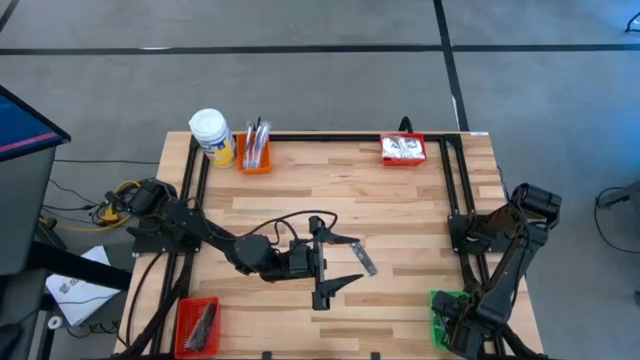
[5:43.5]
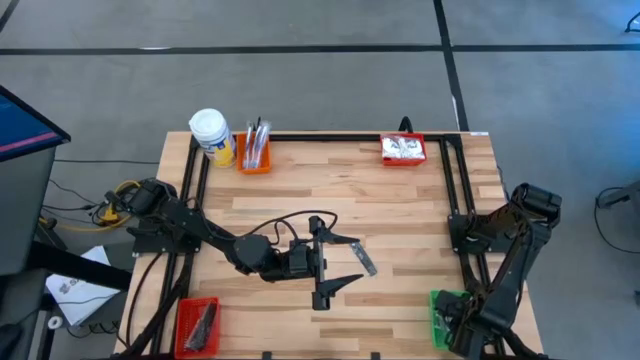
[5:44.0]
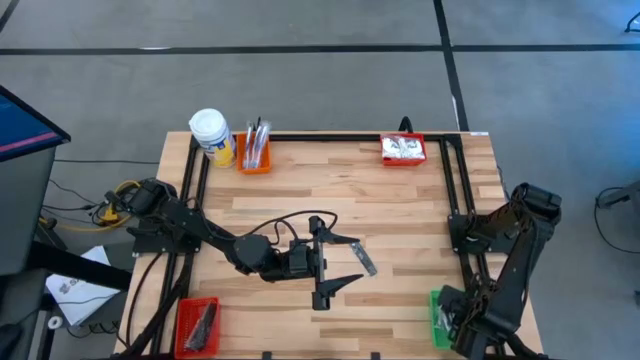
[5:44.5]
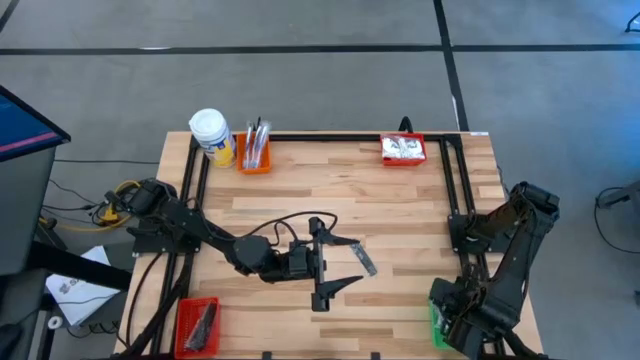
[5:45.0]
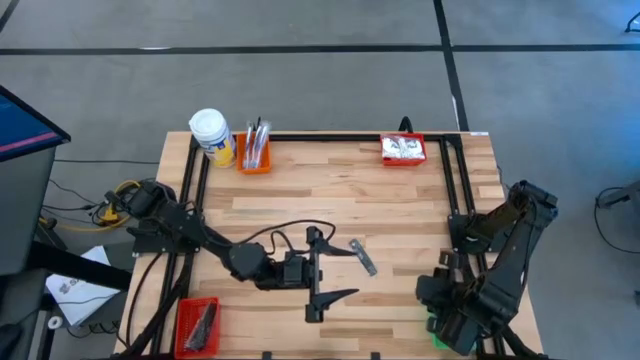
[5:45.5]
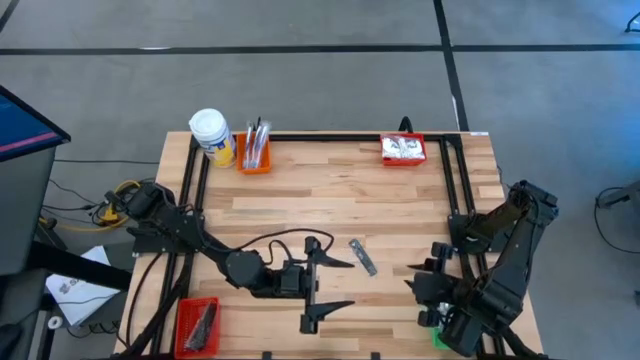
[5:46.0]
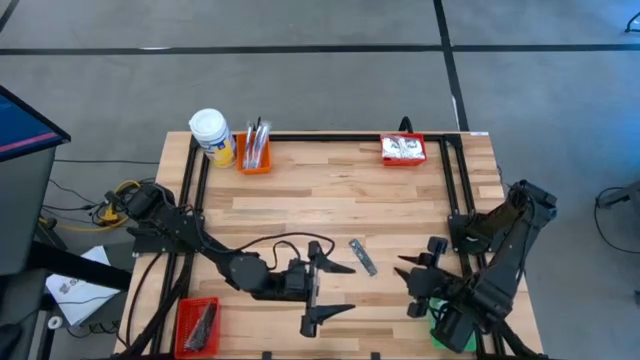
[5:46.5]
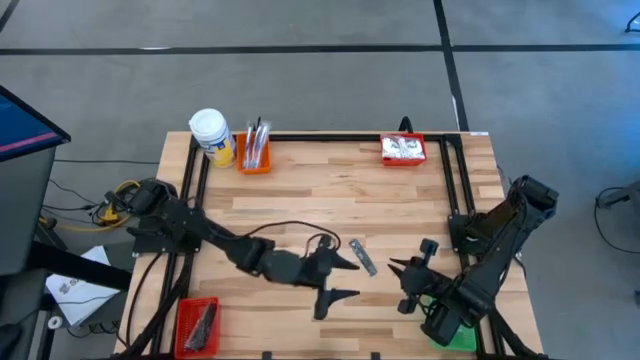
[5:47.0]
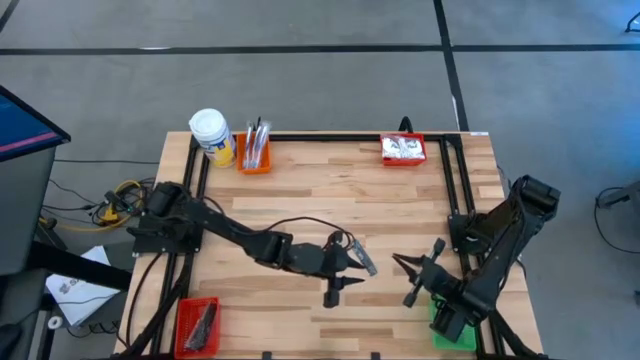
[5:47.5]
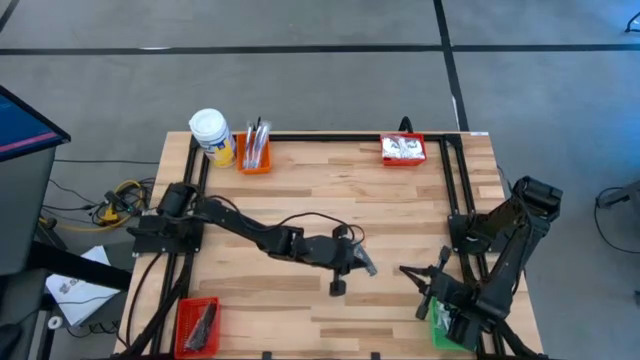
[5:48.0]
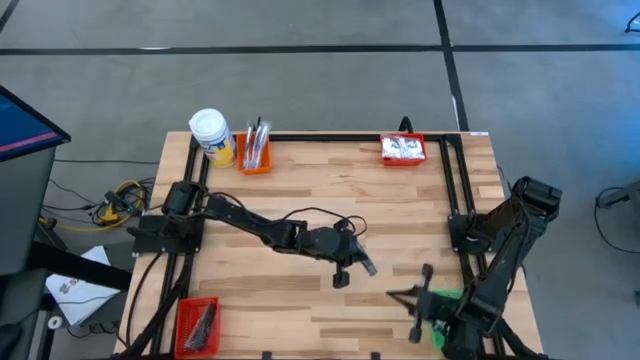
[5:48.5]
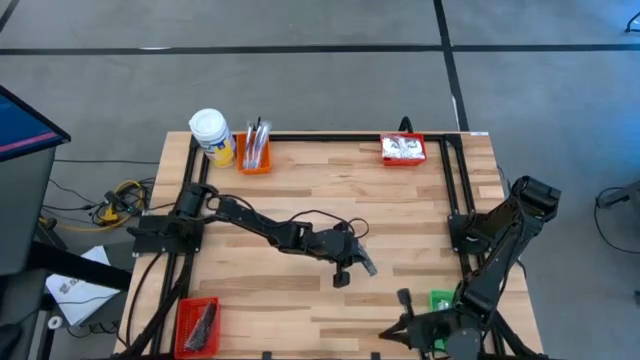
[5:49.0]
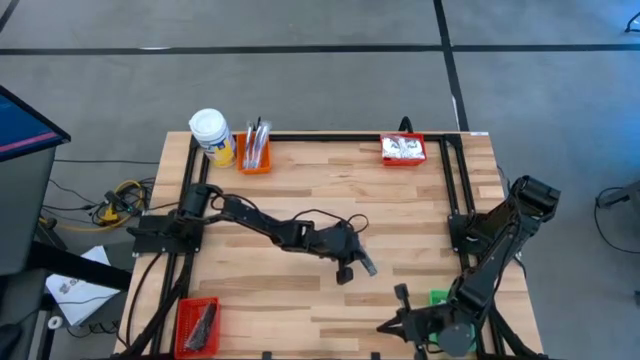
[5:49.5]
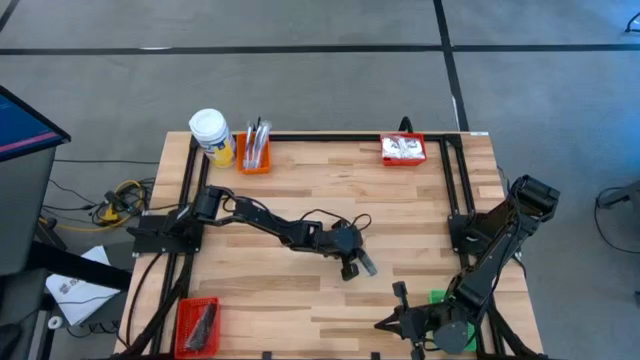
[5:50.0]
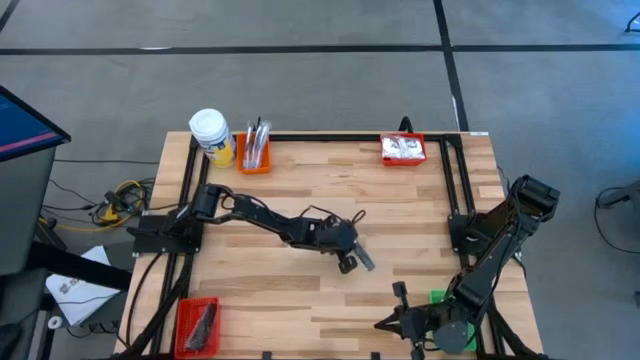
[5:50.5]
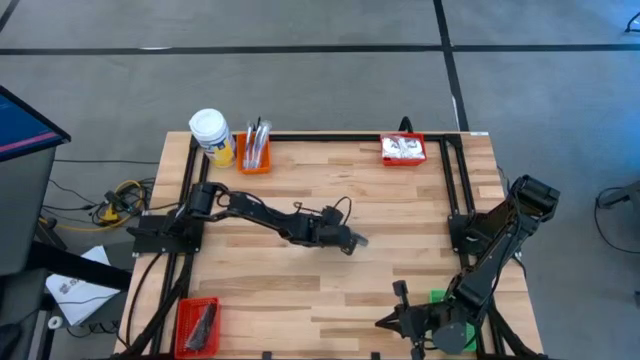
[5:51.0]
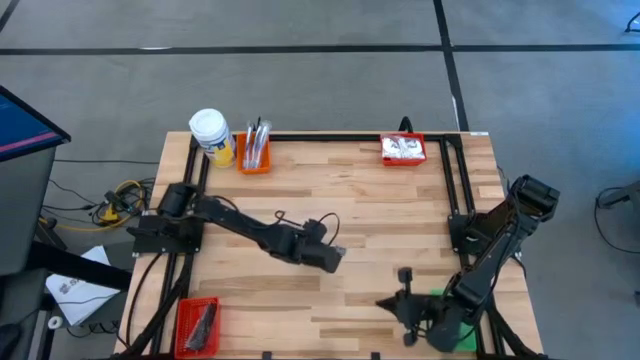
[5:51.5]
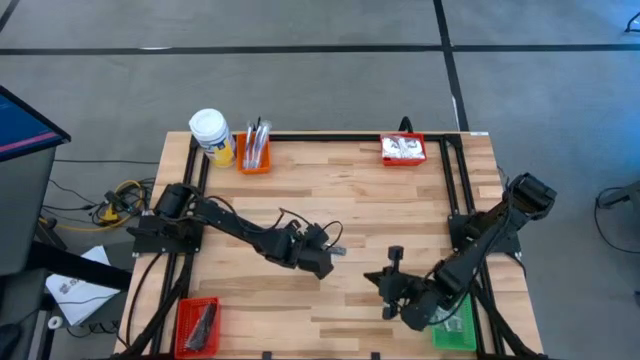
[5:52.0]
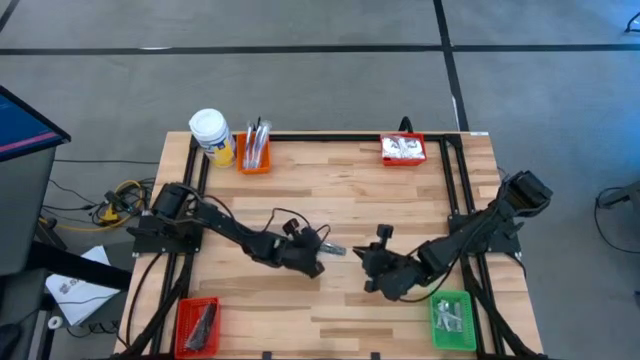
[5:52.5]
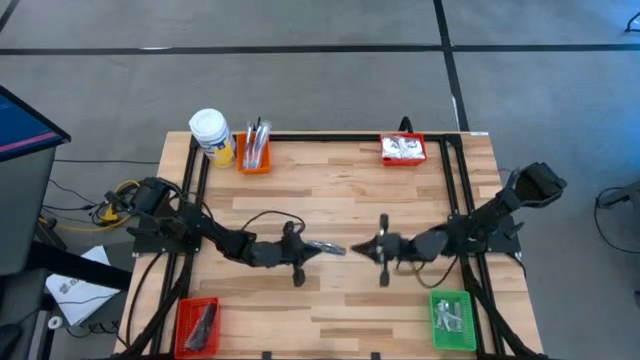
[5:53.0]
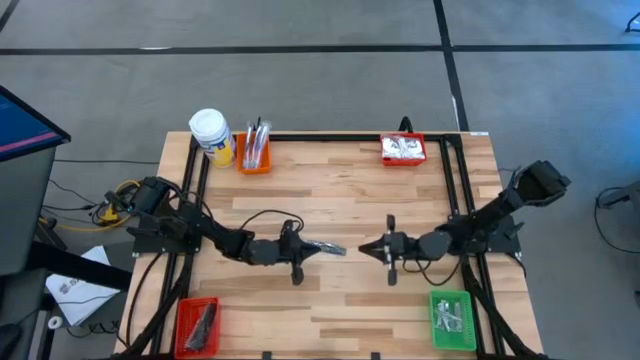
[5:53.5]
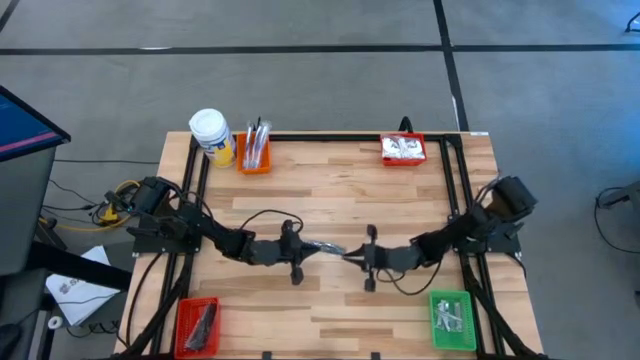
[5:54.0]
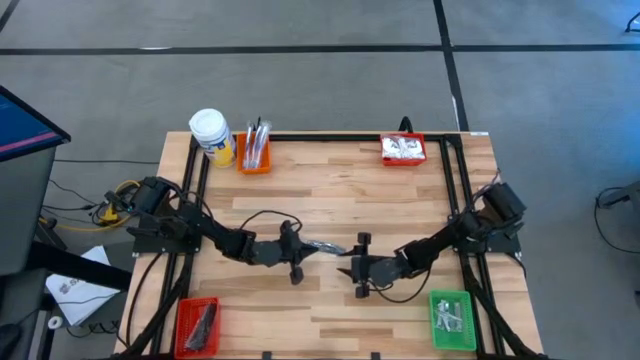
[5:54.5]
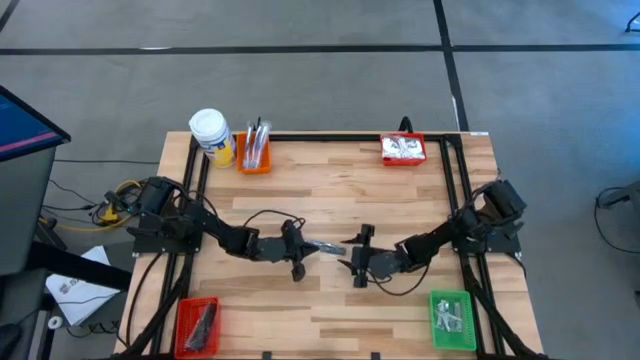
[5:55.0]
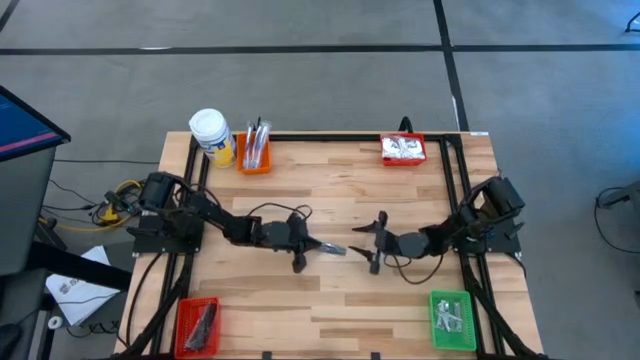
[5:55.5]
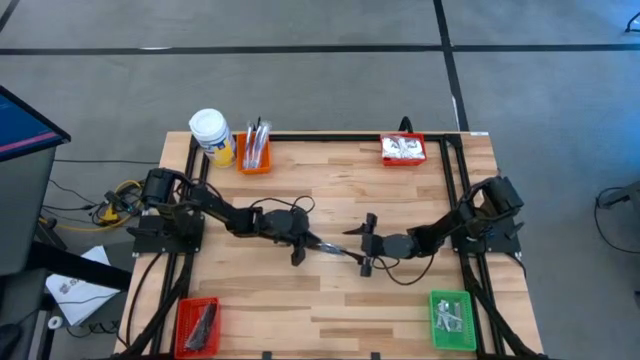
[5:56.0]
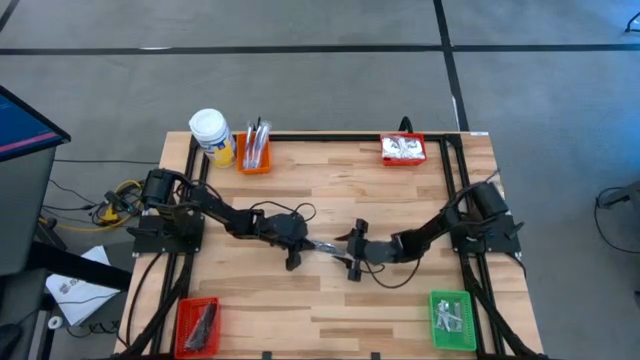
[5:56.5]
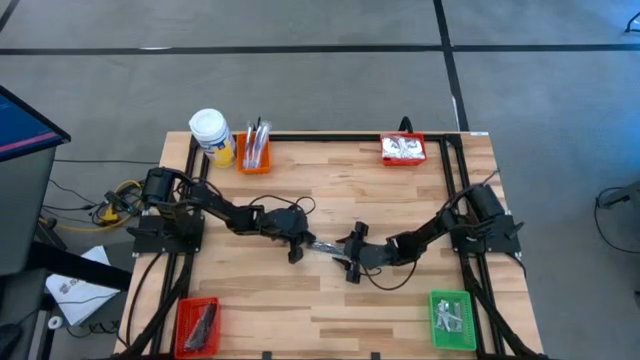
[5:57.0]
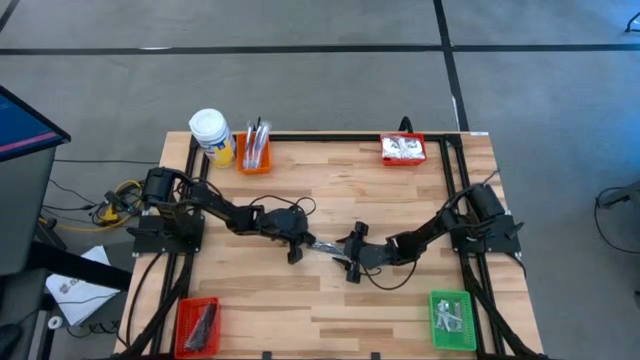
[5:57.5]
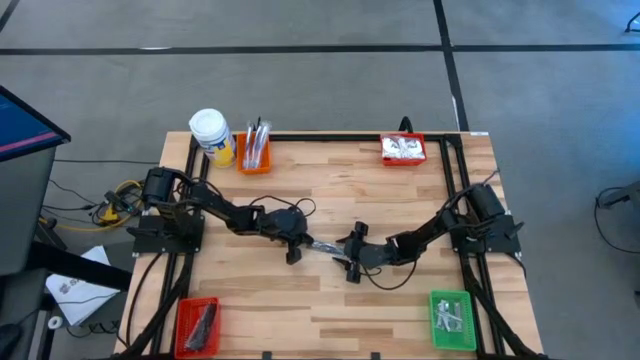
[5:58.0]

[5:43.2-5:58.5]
Task: Pick & Place Travel size toiletries
Put the comb into the bottom red bin

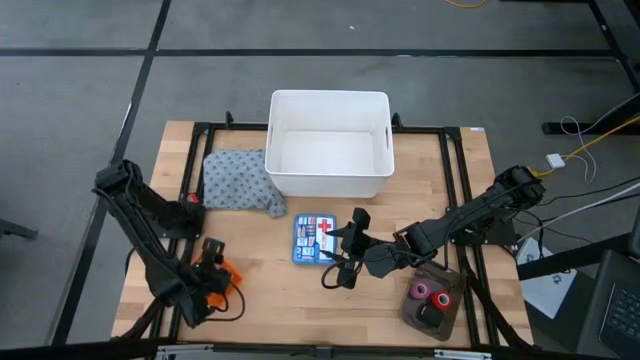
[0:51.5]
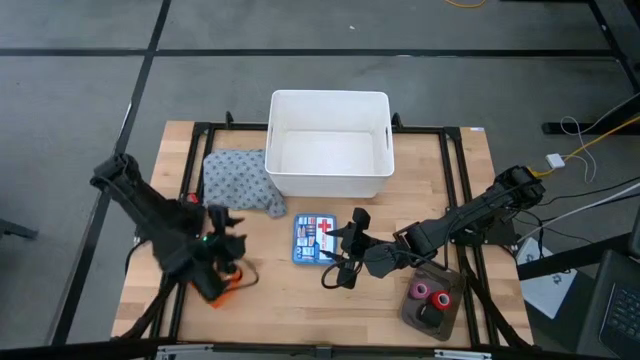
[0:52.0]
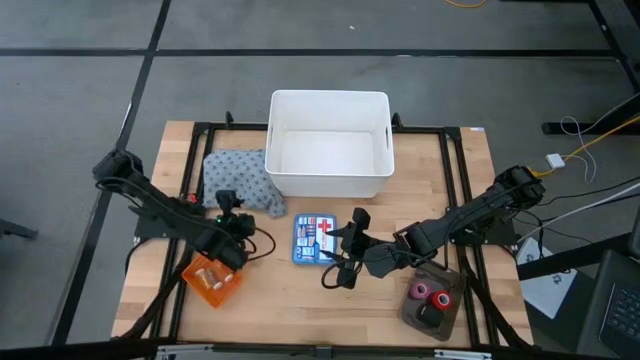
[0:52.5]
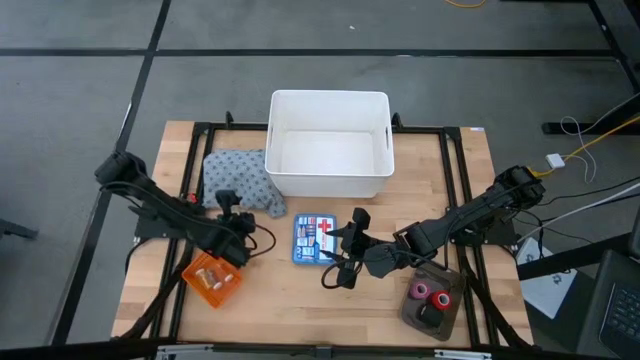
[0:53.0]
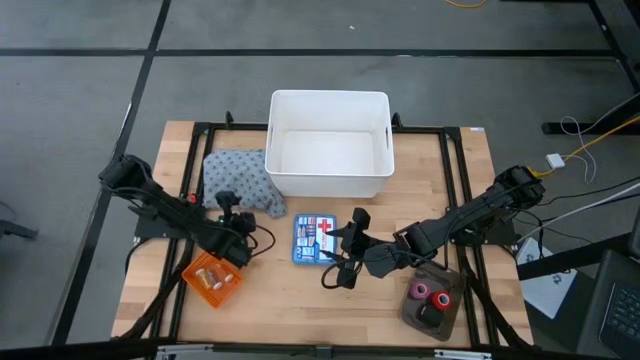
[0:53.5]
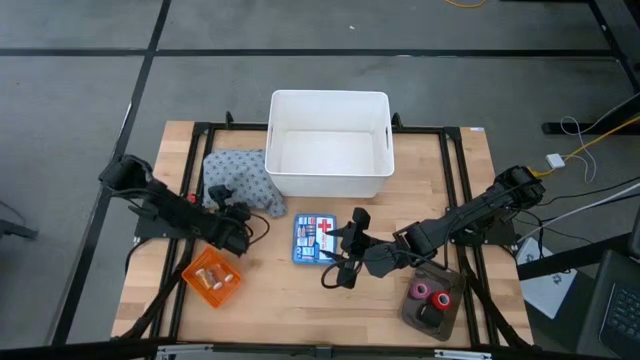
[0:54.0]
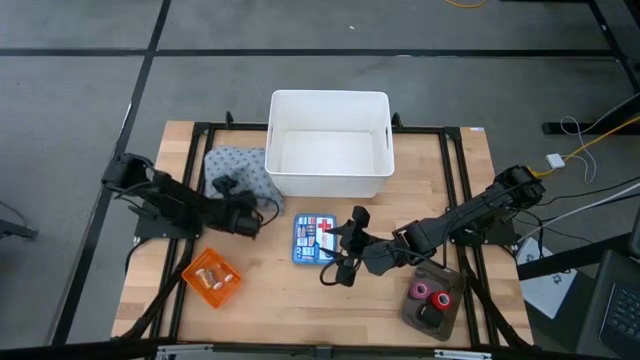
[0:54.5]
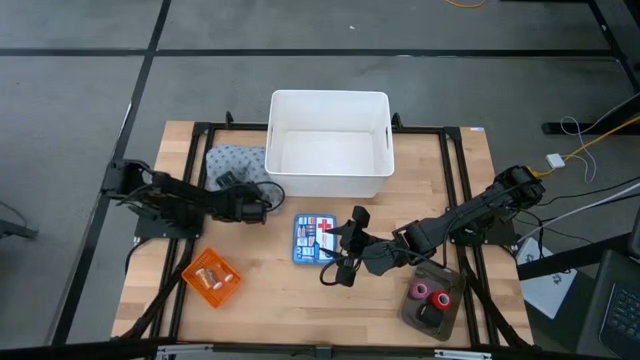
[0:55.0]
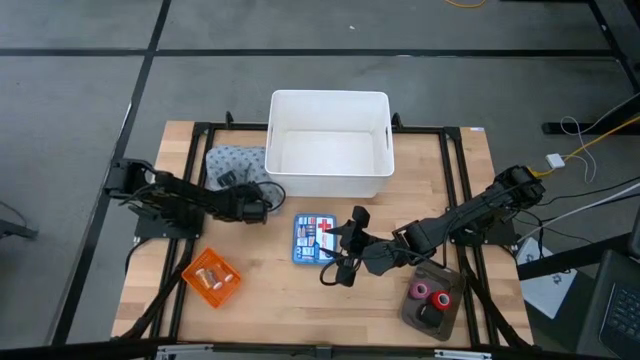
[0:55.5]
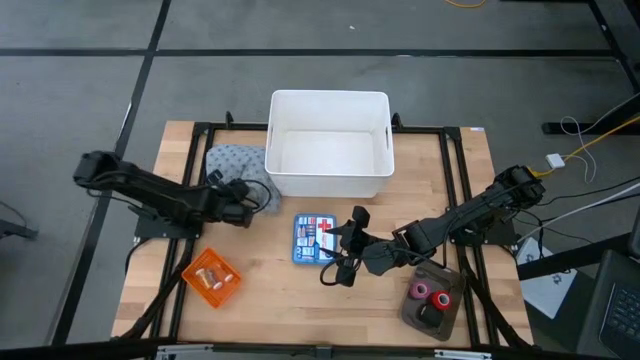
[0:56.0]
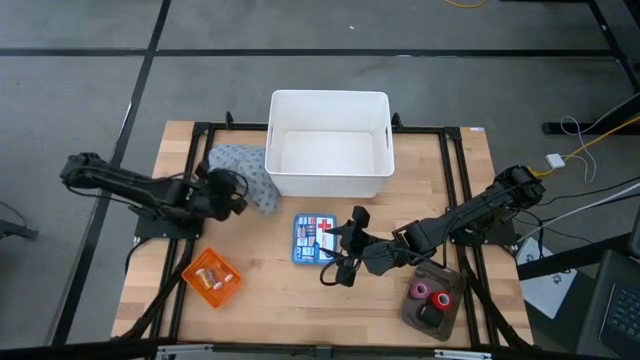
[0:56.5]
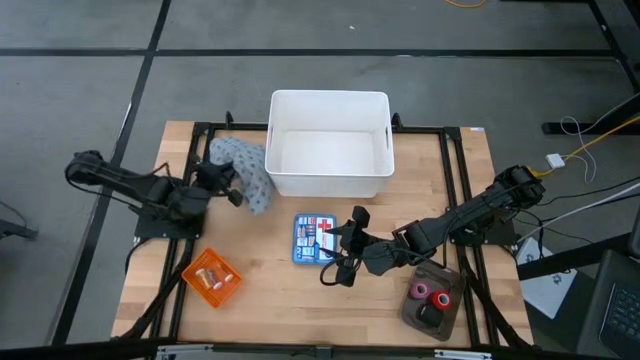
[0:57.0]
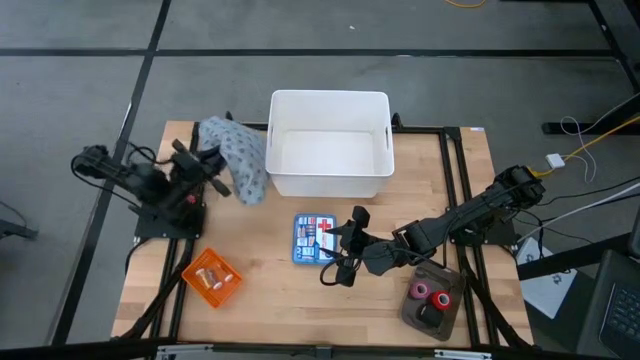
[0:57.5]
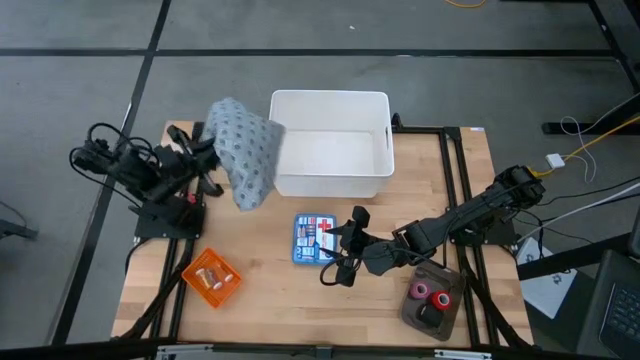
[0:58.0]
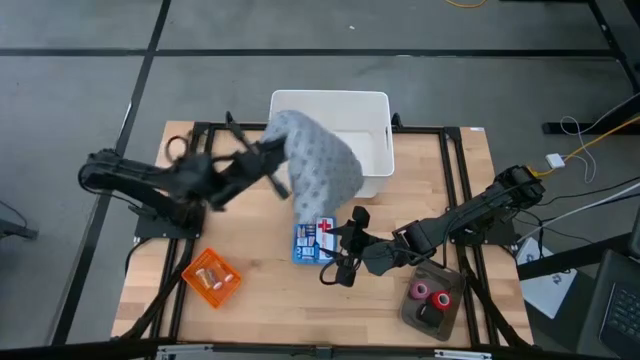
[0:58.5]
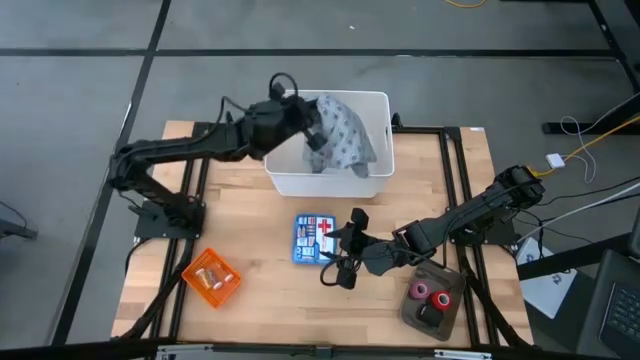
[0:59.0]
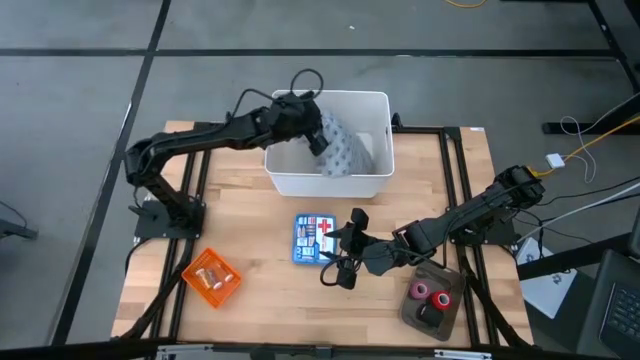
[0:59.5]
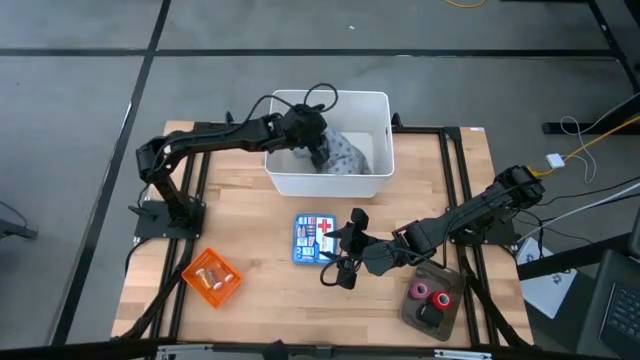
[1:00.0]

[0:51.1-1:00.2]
Task: Pick & place medical supplies in basket/bin
Put the gray patient gown into the white bin
